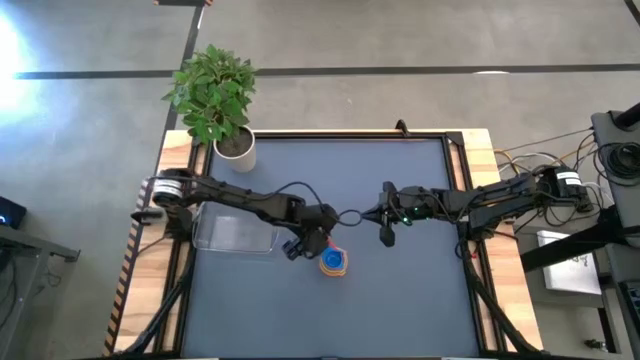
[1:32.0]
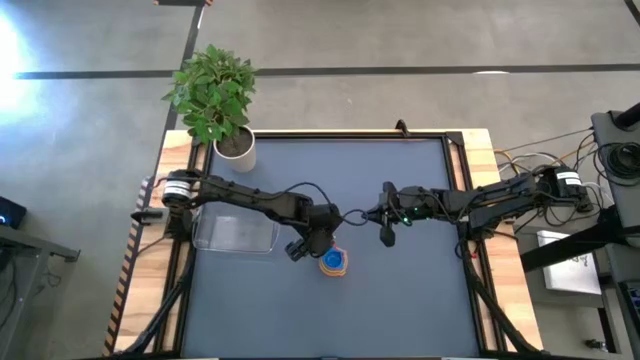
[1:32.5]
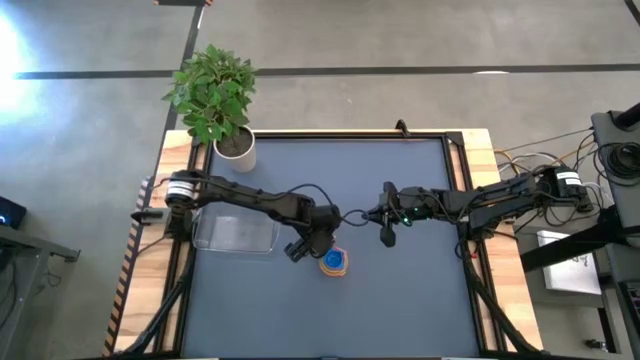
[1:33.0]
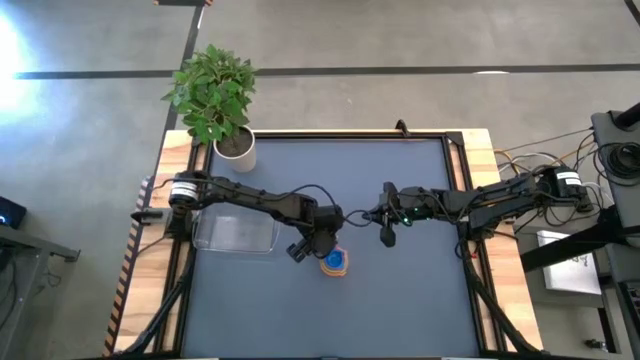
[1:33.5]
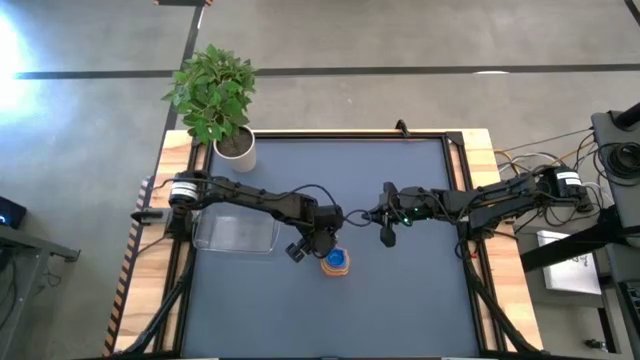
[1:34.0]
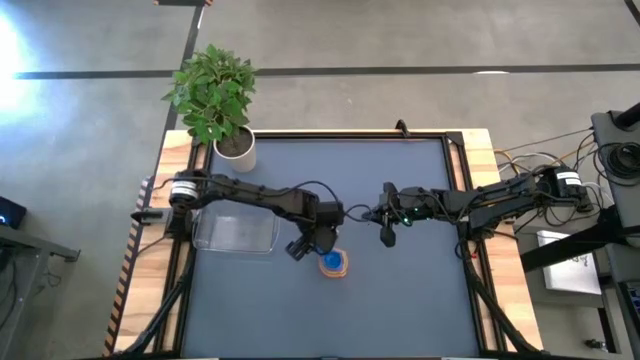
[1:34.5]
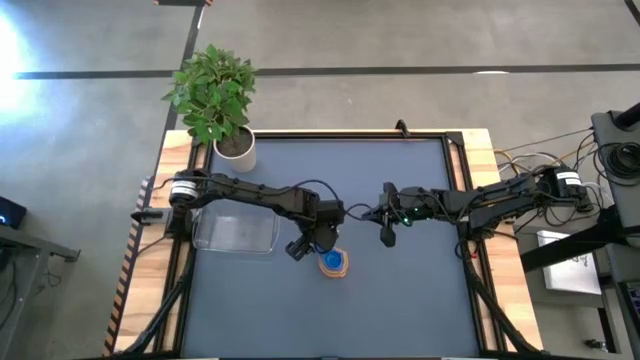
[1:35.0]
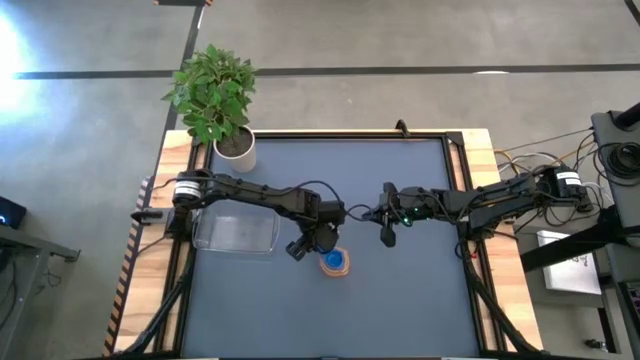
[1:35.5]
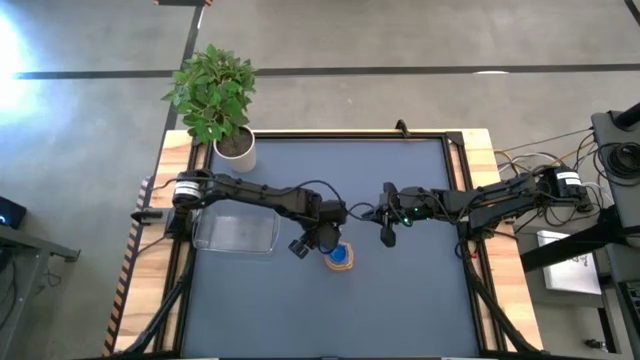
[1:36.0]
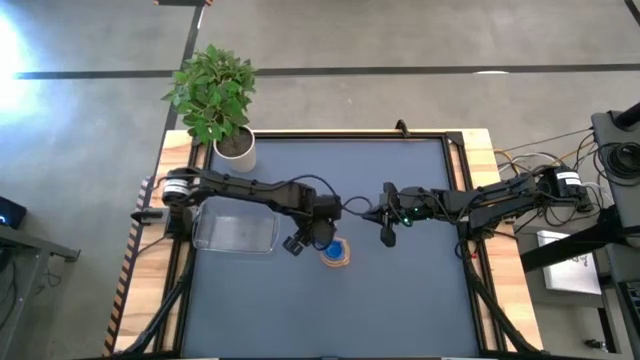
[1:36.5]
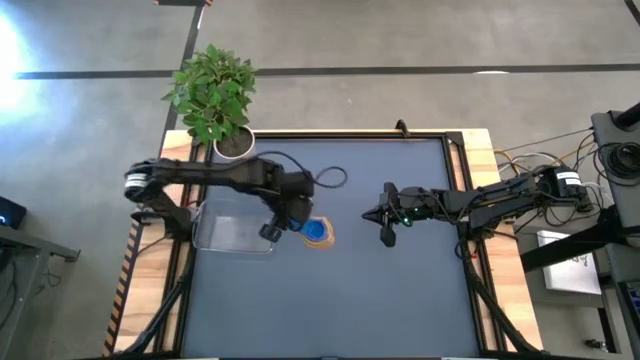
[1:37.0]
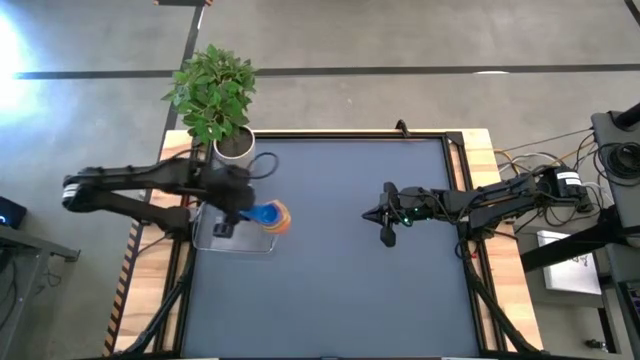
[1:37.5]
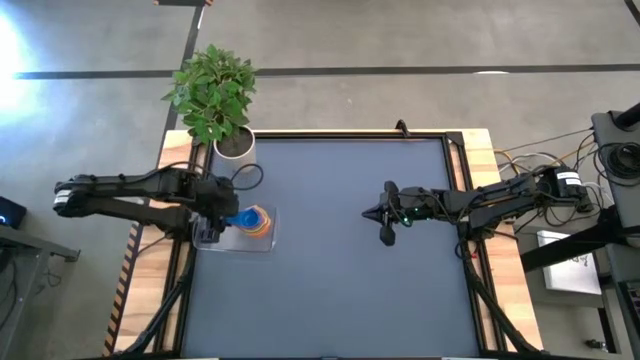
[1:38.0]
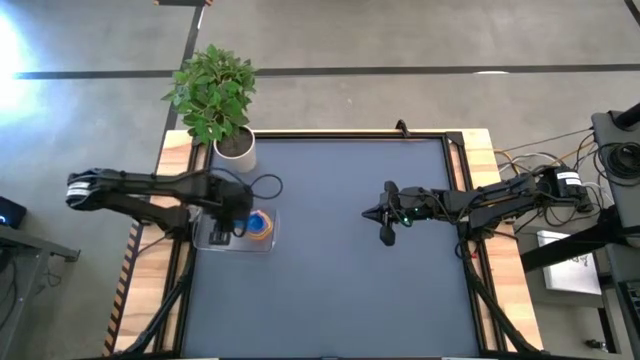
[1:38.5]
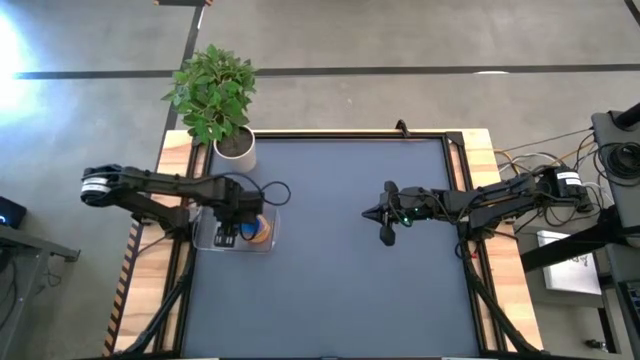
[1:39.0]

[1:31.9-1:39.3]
Task: Nest measuring cups in basket
Put the stacked colored measuring cups into the transparent bin

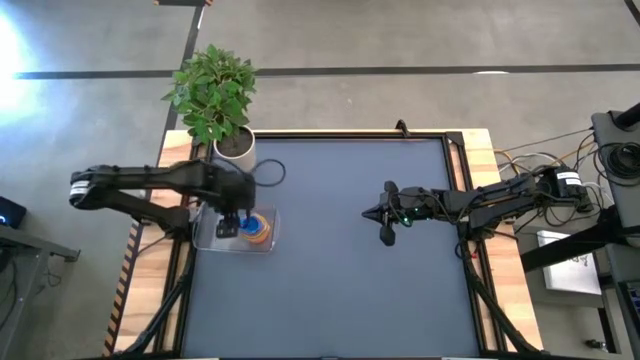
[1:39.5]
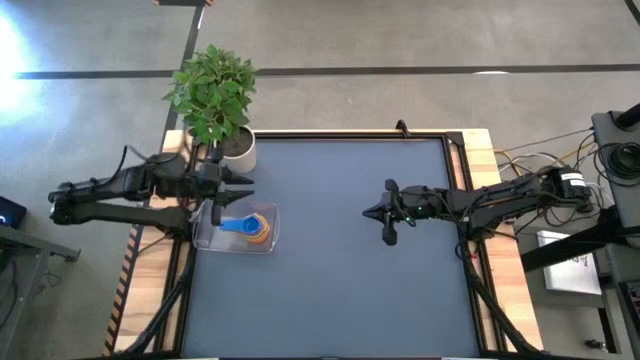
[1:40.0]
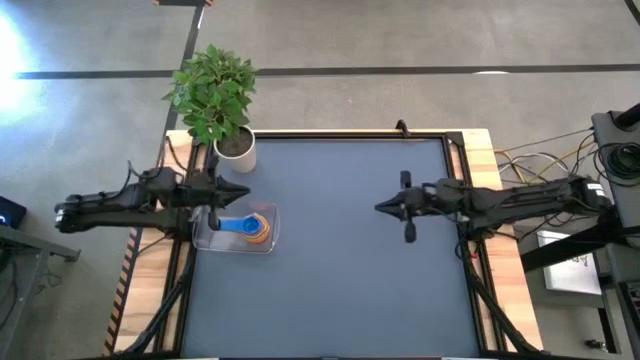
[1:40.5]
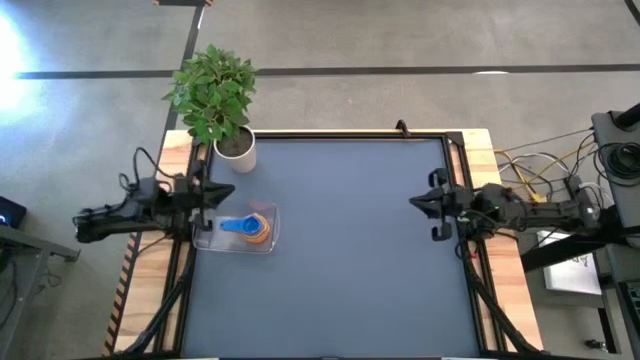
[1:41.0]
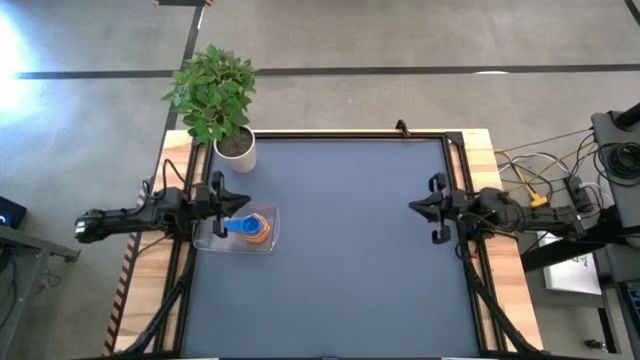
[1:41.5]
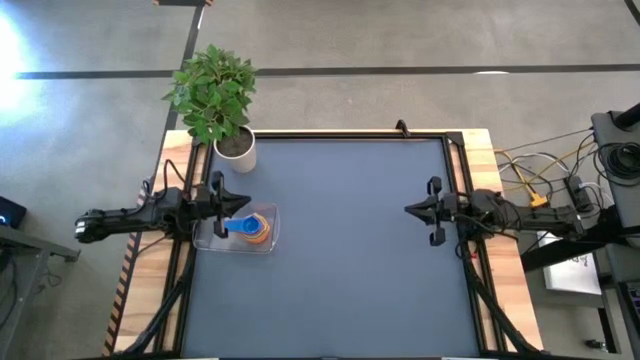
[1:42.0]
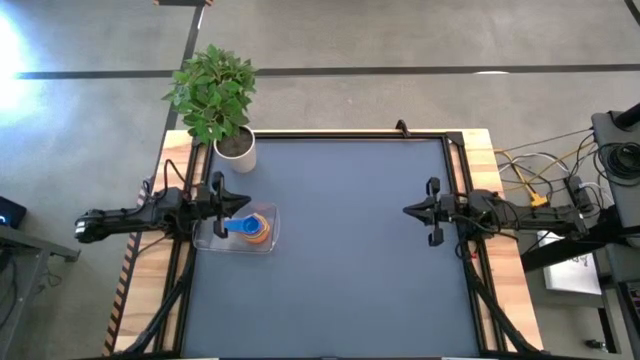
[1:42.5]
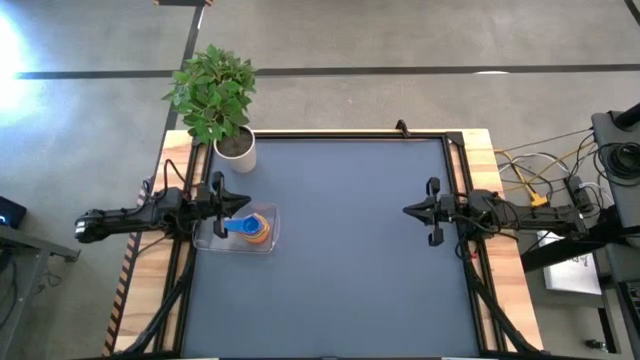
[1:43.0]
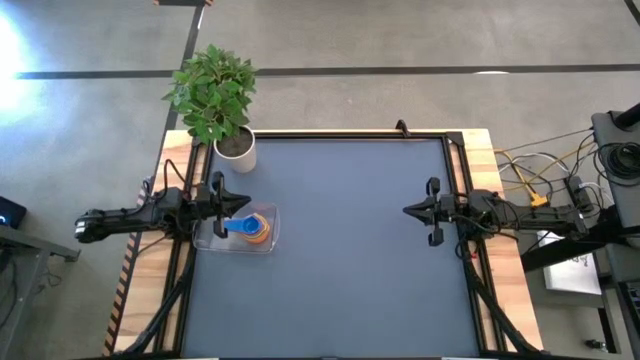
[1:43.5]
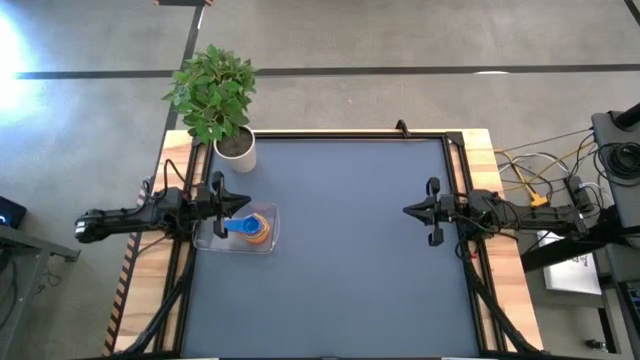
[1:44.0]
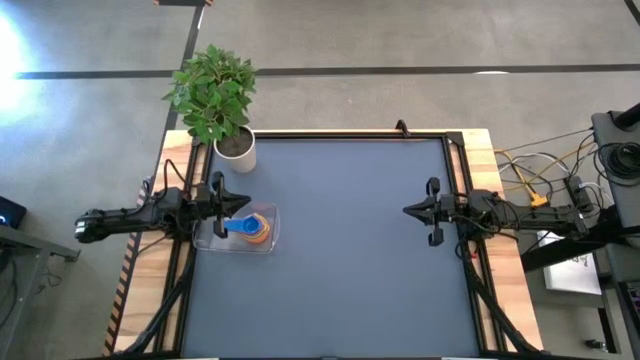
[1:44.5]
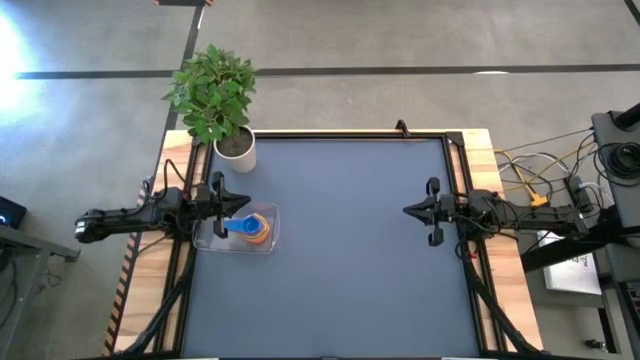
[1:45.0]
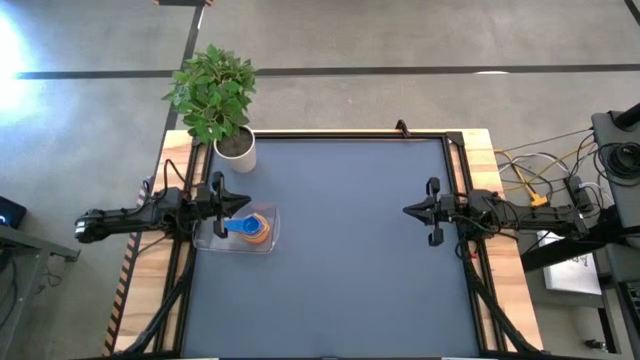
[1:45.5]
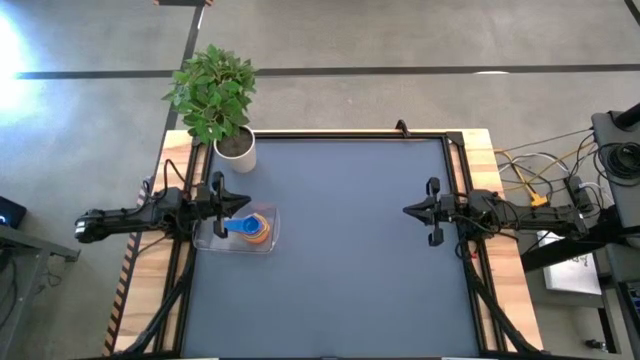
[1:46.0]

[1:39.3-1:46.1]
Return to Home Position

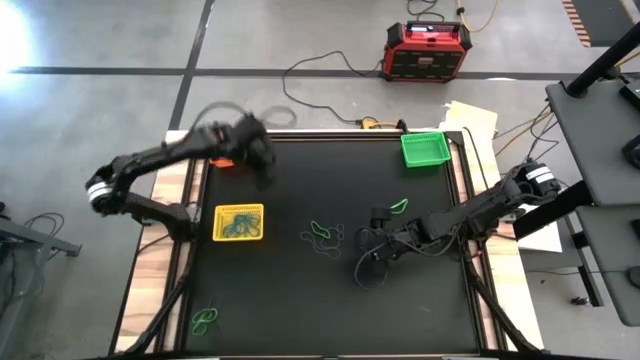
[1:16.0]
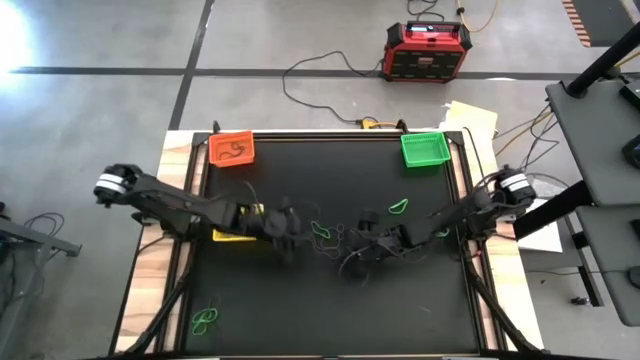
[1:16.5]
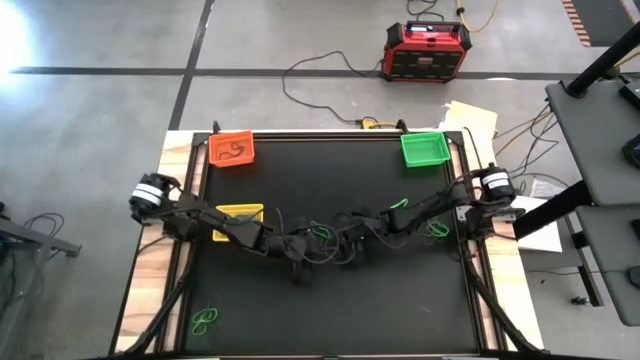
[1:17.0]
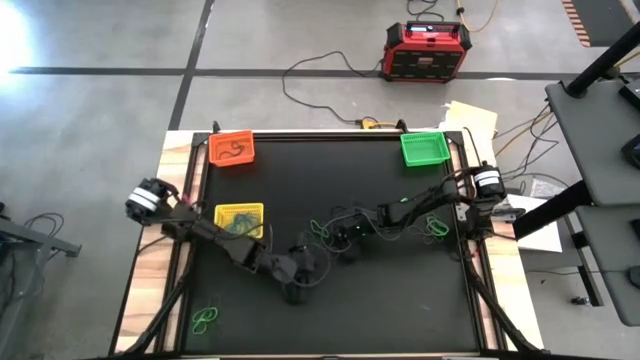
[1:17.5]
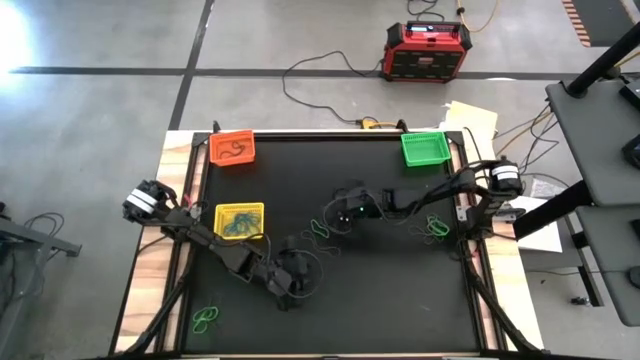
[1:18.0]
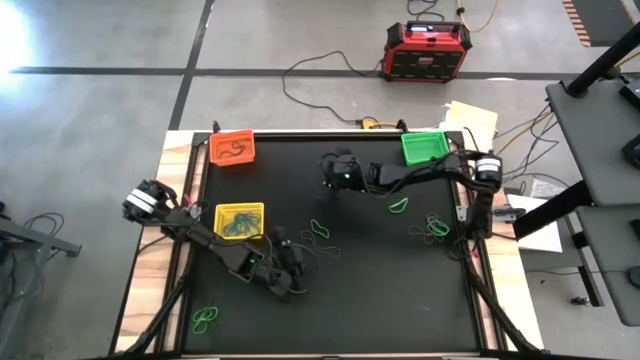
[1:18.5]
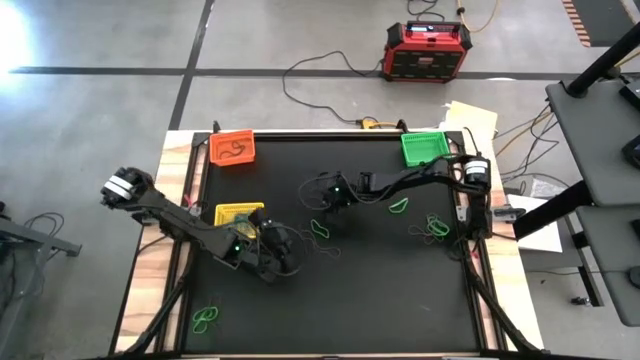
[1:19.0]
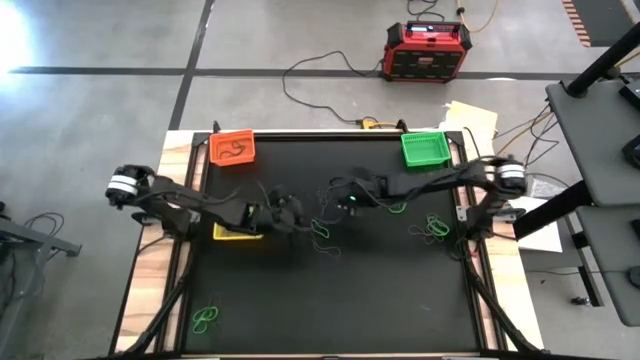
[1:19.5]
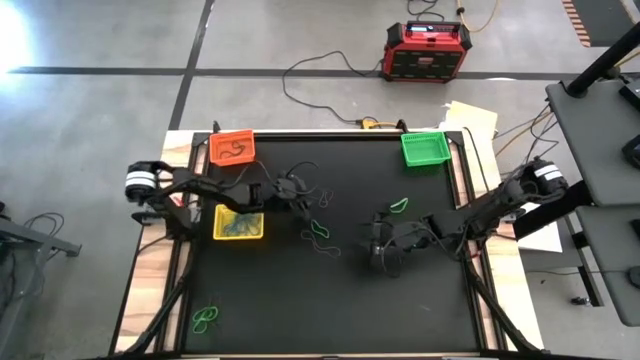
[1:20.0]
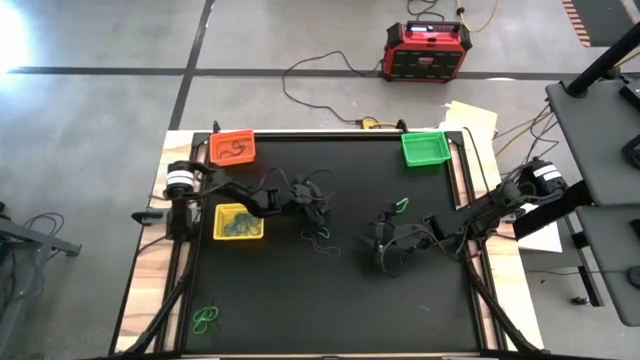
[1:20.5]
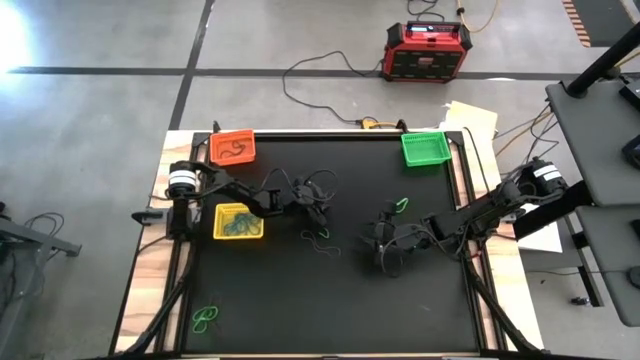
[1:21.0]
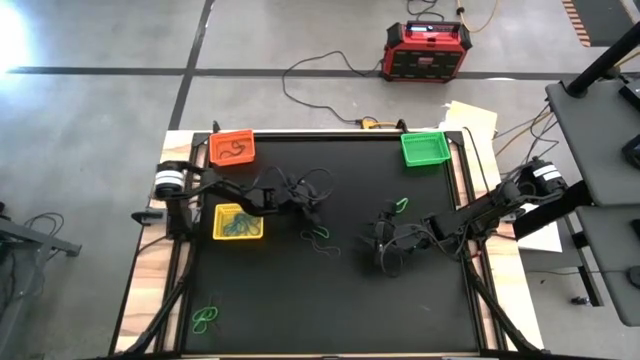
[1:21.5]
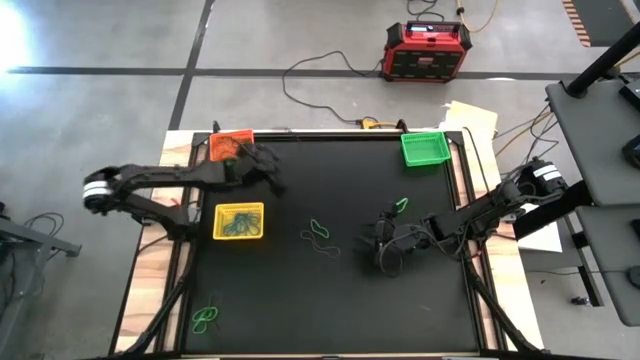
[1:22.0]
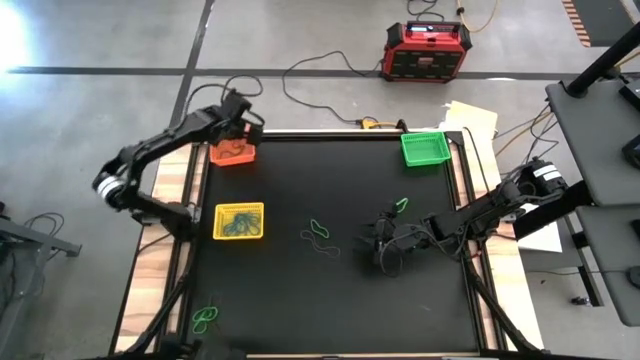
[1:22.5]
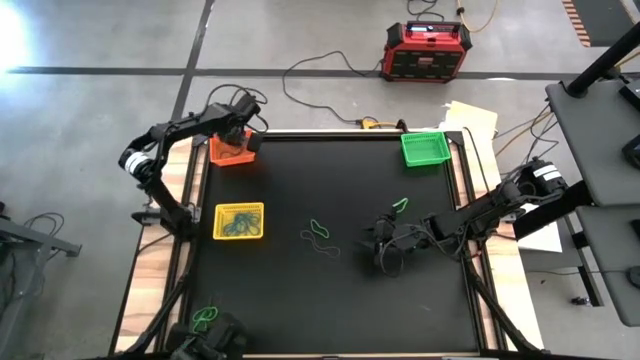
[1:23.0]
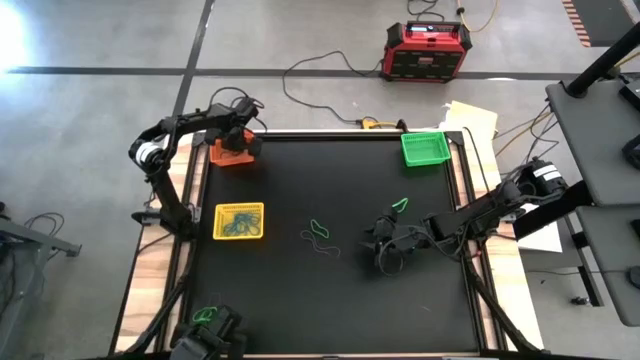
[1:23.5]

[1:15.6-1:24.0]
Task: Sort rubber bands into baskets
Put the purple rubber band into the orange bin
